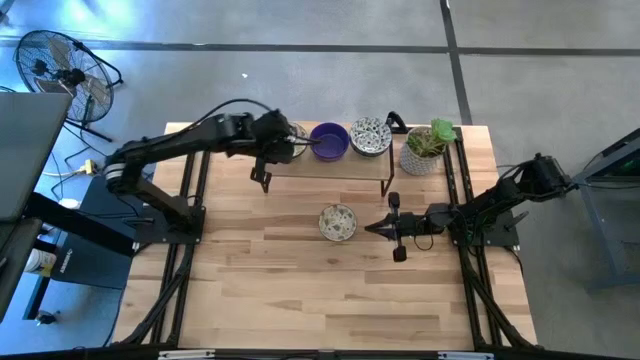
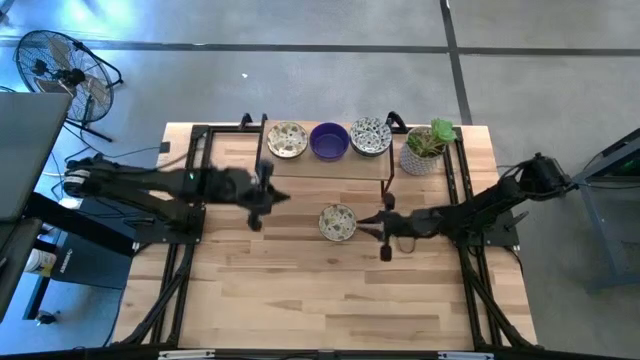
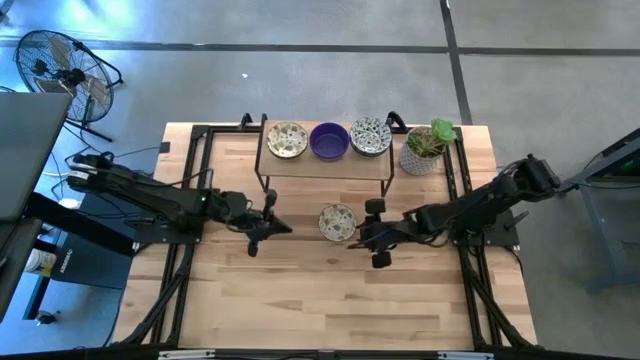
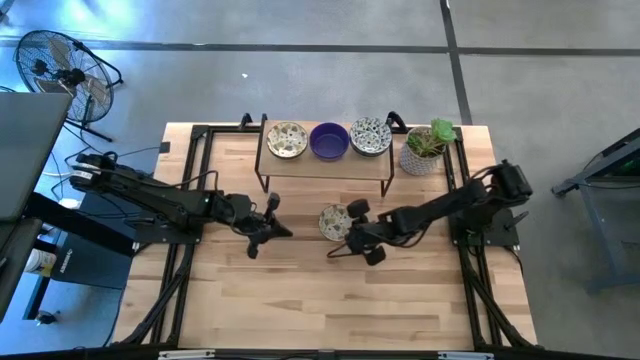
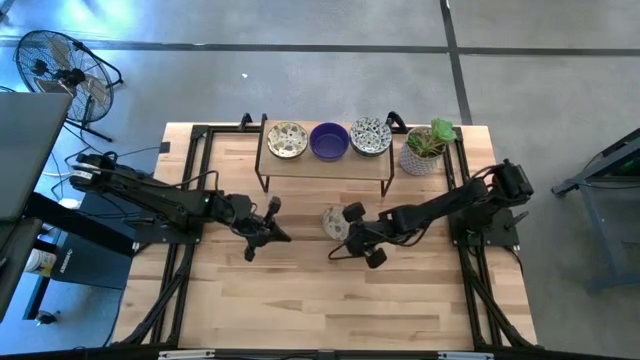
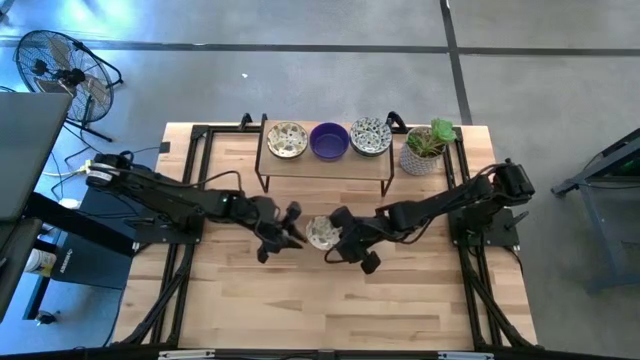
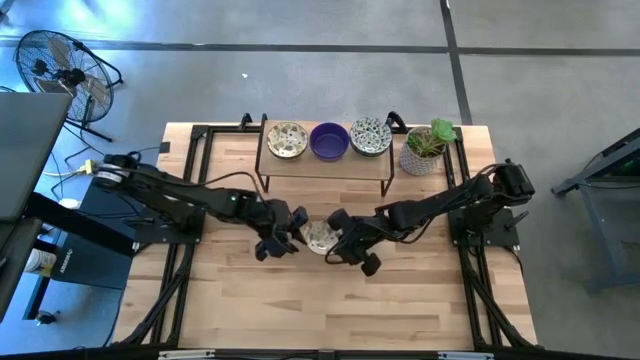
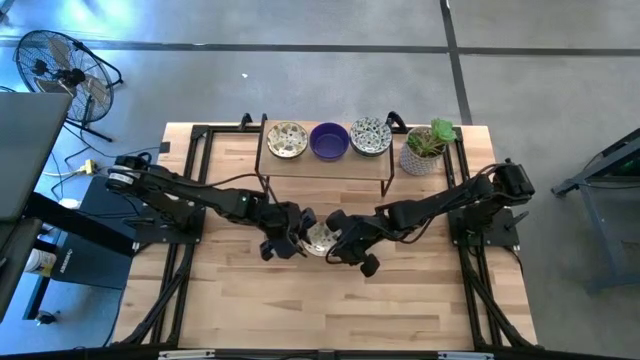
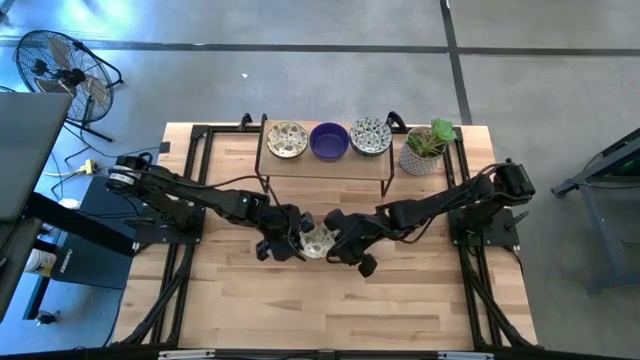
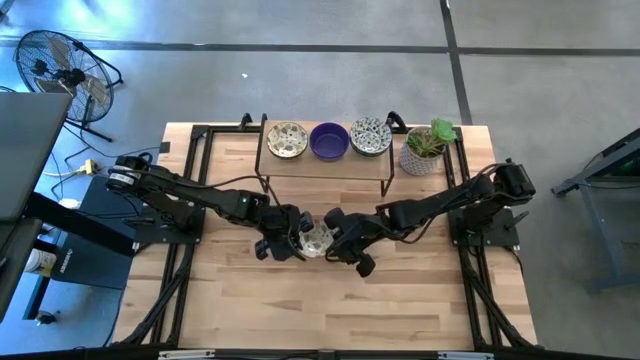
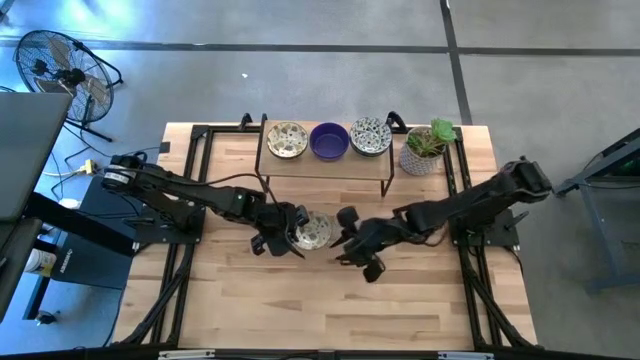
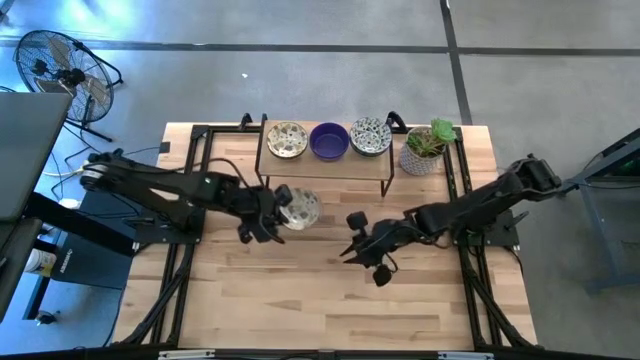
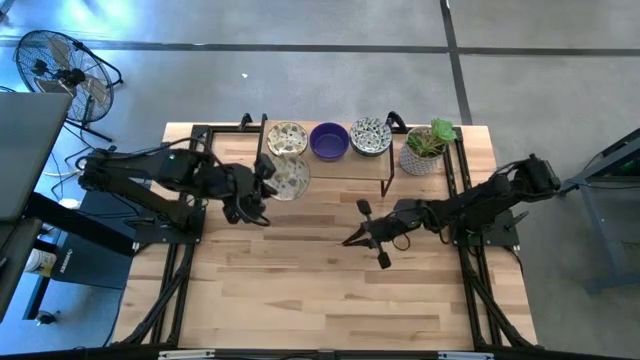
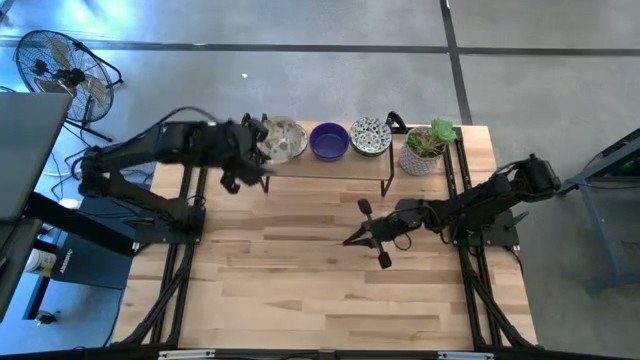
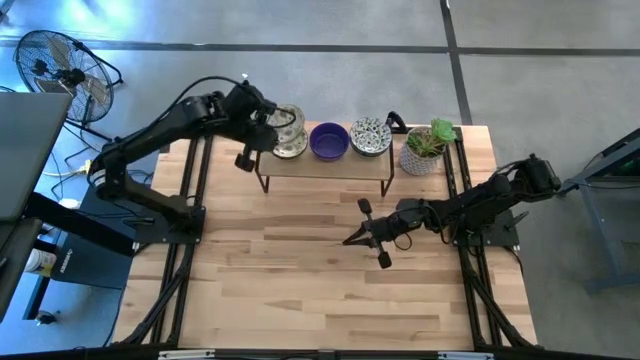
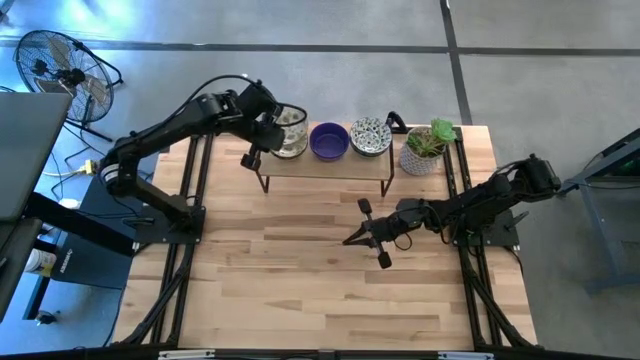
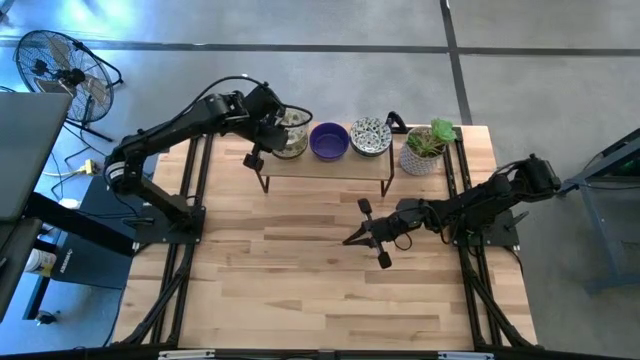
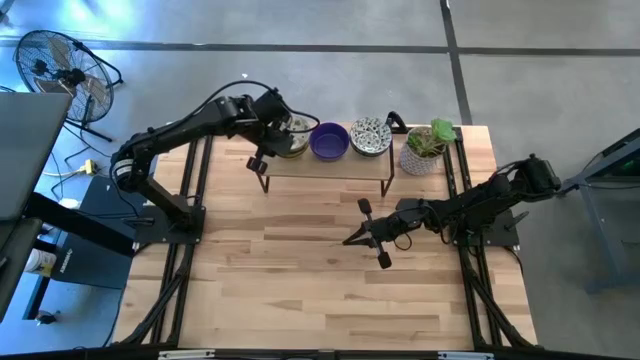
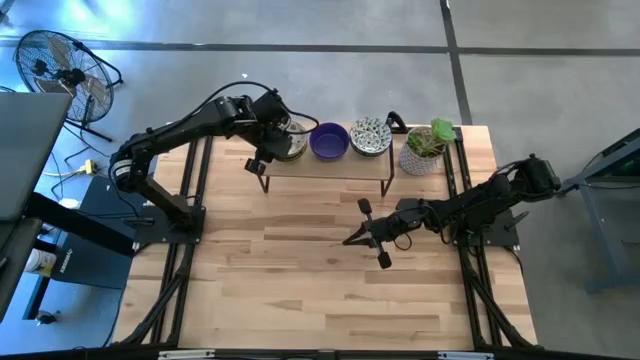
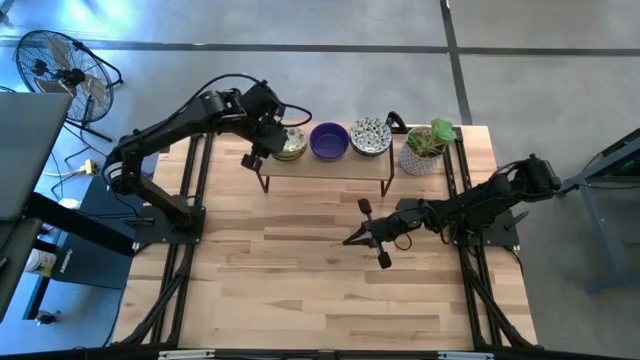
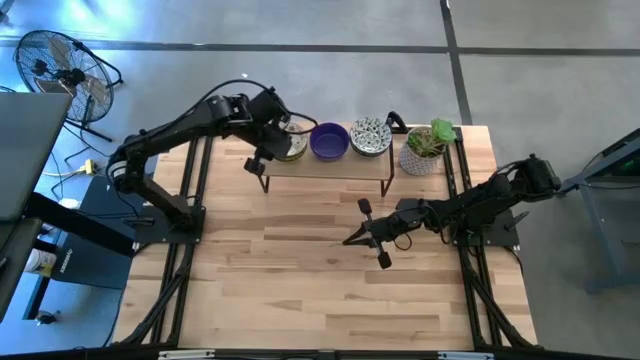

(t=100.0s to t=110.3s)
Task: Pick & Place Mini bowls
Stack the yellow patterned bowl on top of the yellow patterned bowl on the shelf

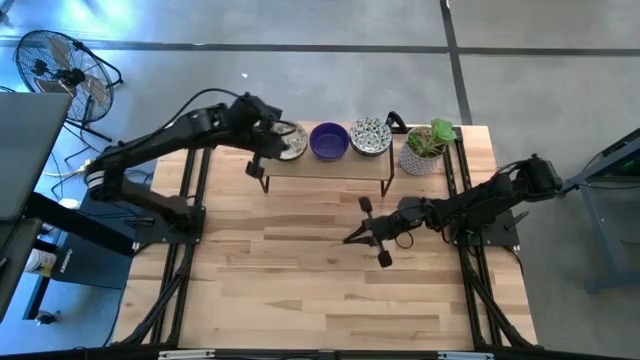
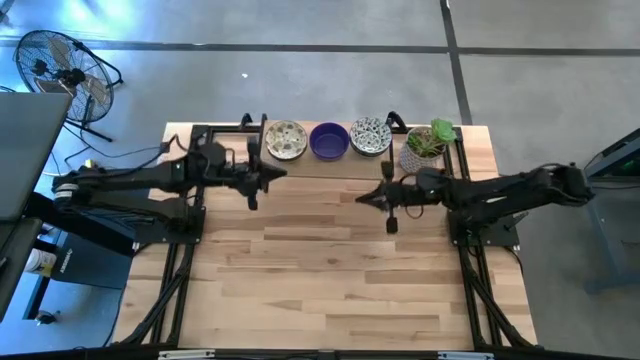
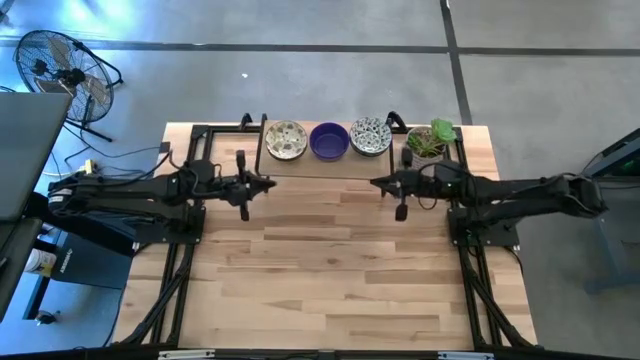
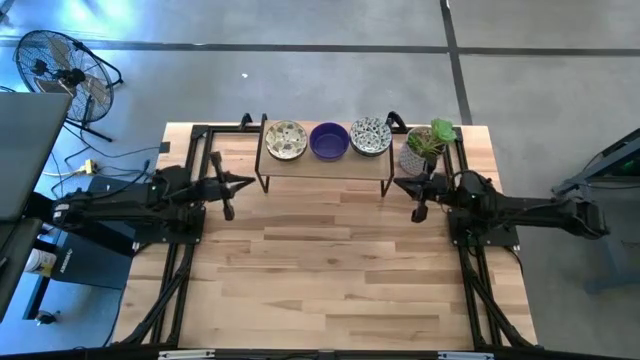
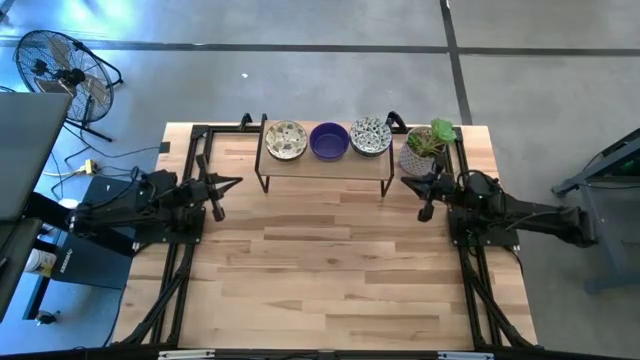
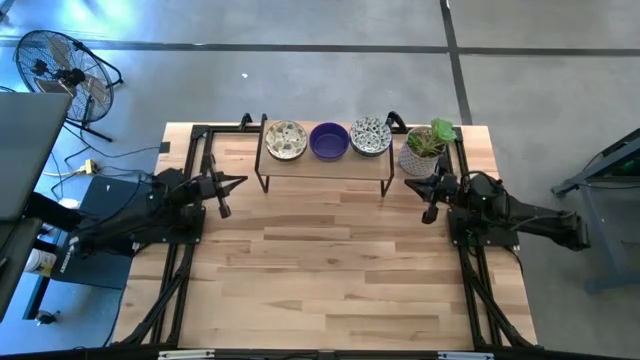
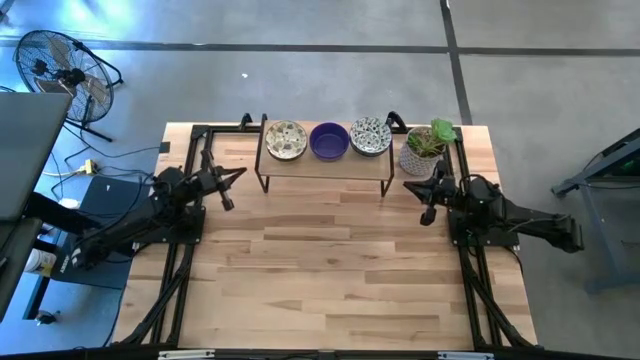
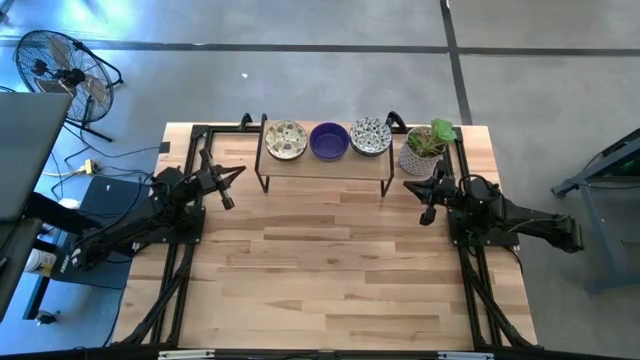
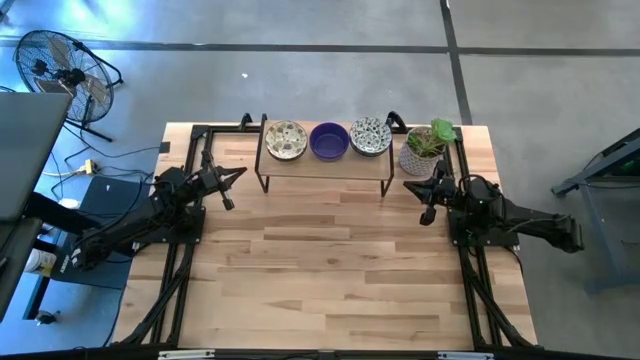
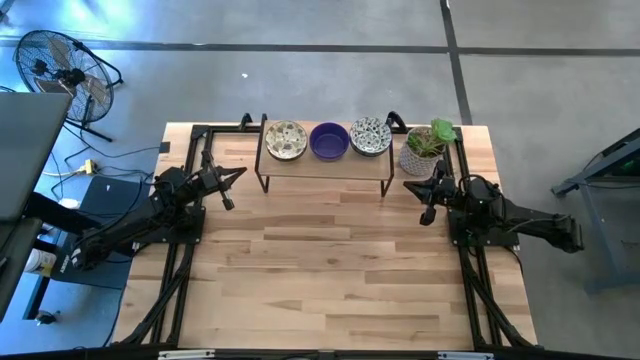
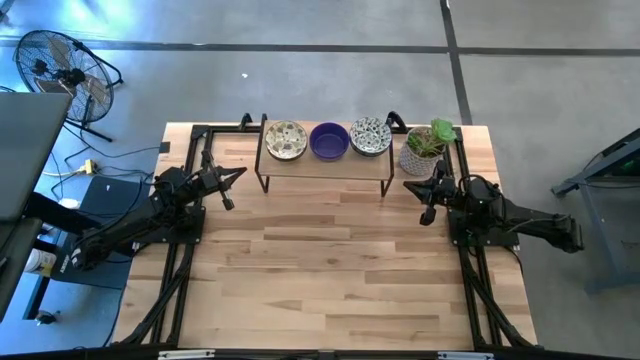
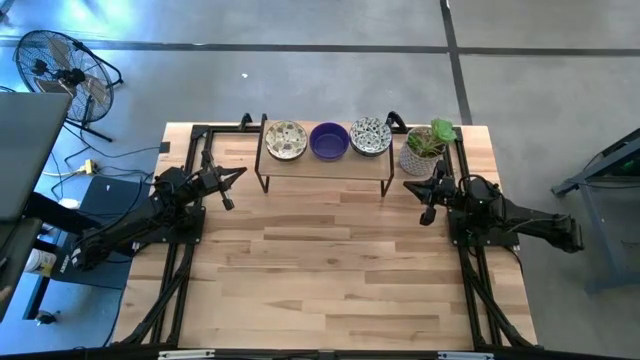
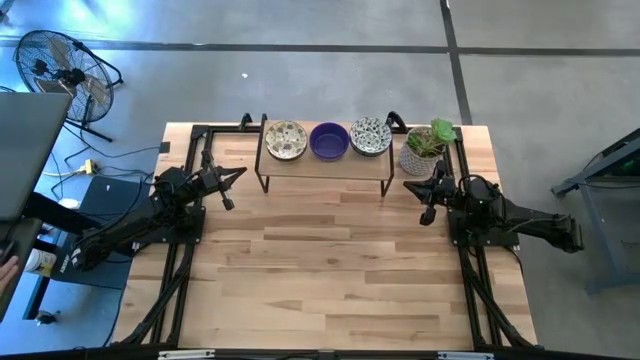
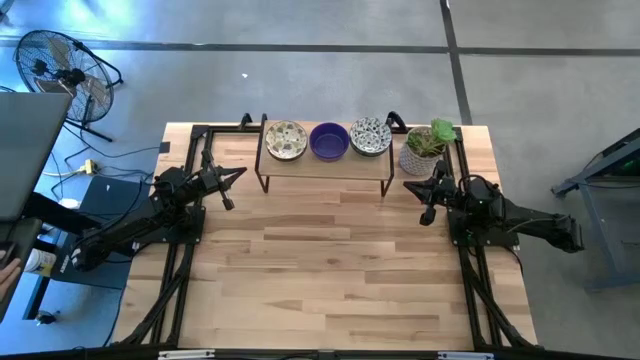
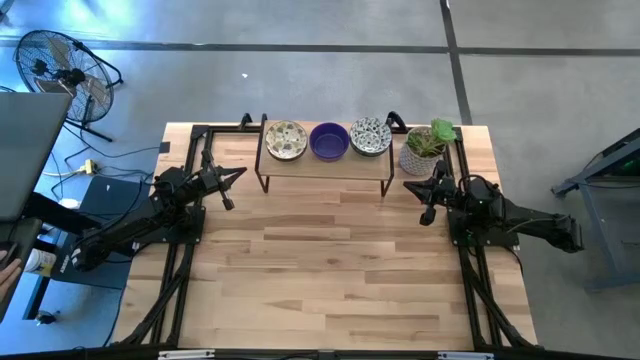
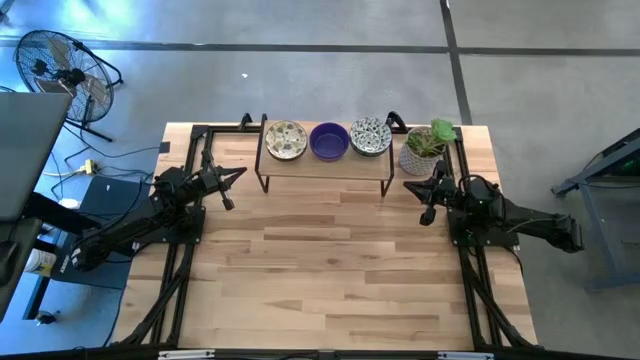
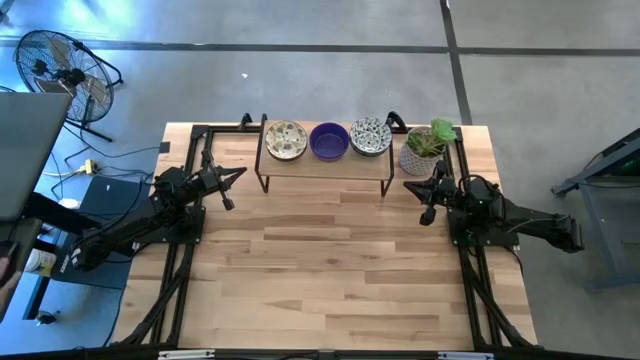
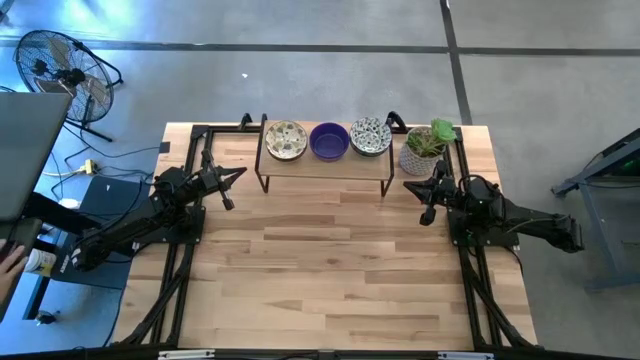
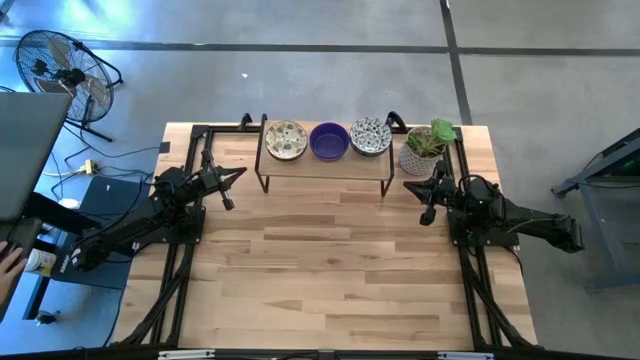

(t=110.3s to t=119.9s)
Return to Home Position

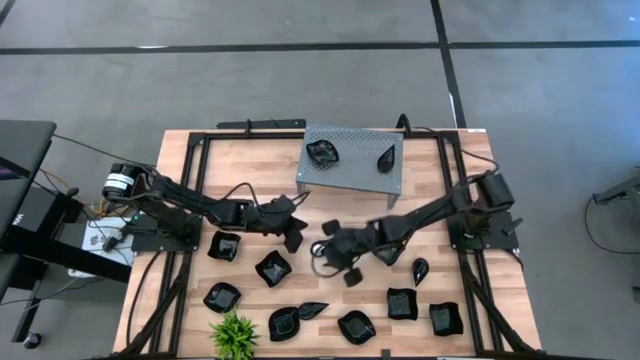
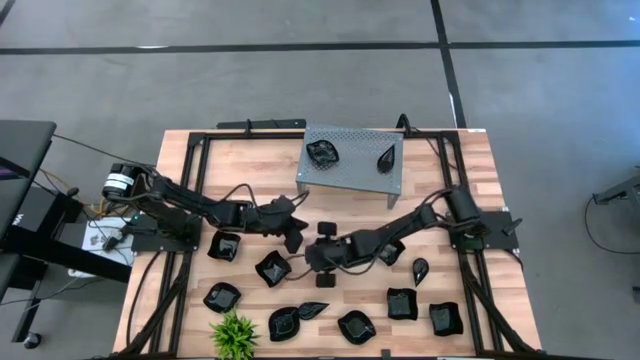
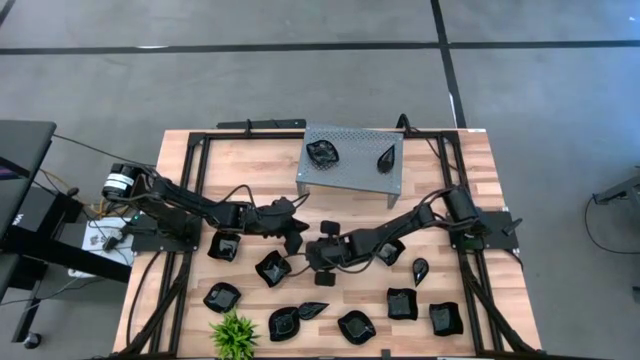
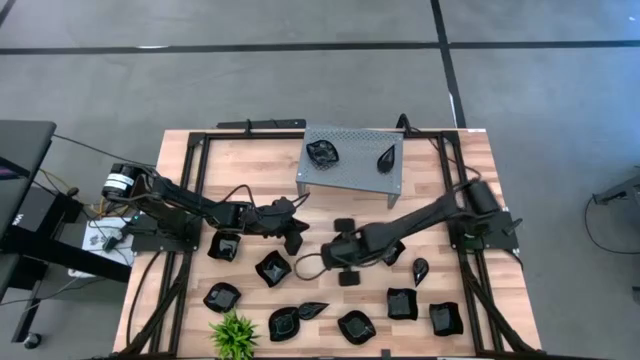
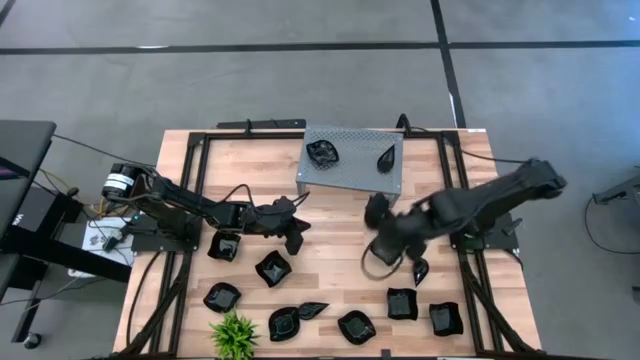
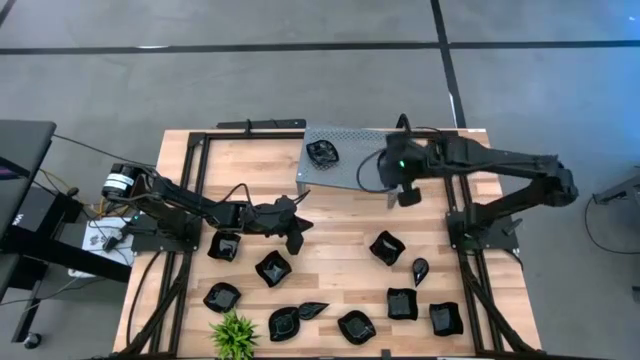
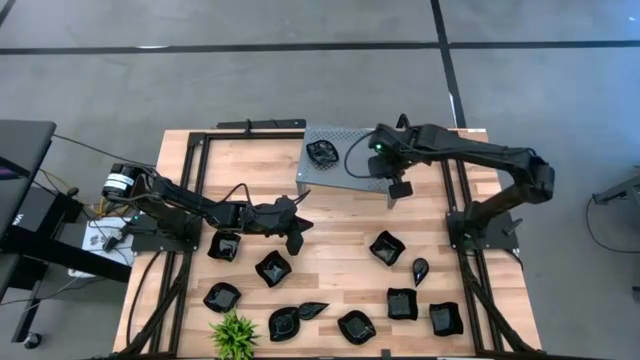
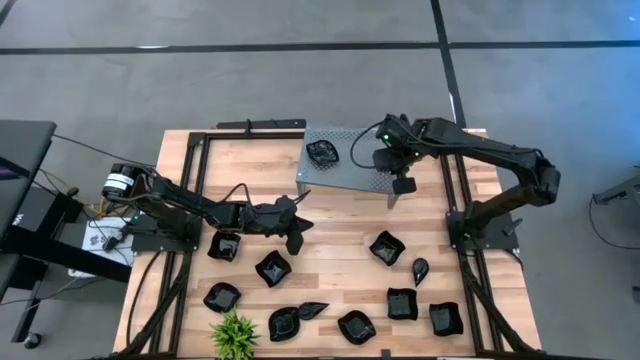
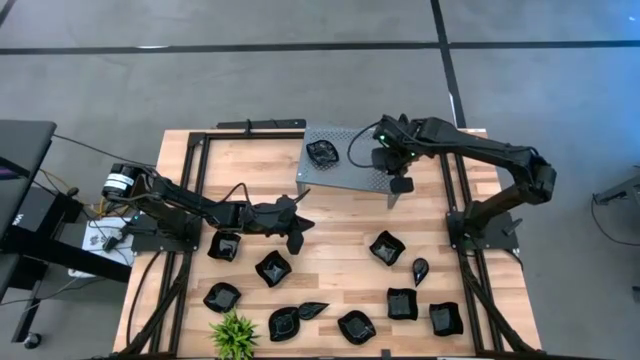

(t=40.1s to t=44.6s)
Task: Pick & Place Mini shaped plates
Stack the black drop-shaped plate on the other drop-shaped plates on the shelf
